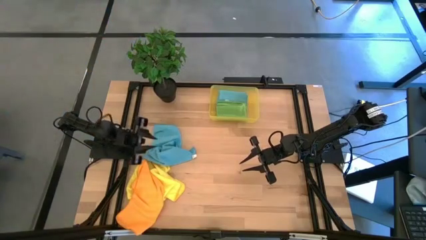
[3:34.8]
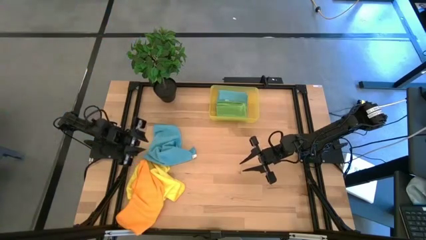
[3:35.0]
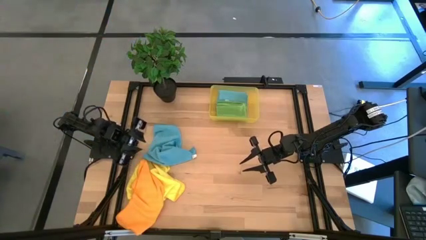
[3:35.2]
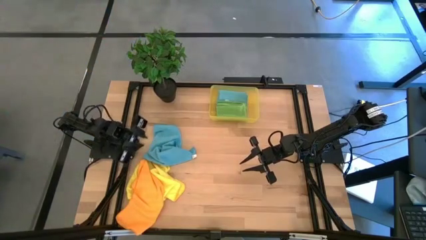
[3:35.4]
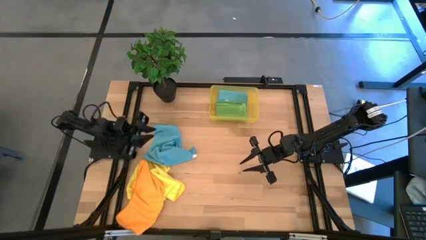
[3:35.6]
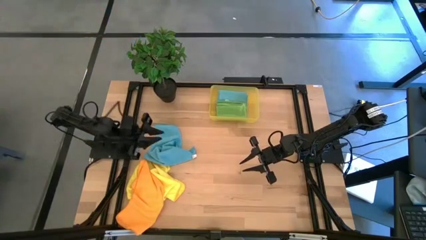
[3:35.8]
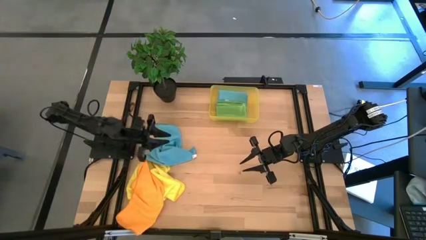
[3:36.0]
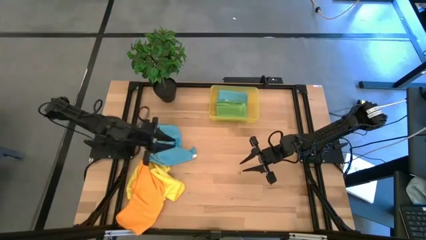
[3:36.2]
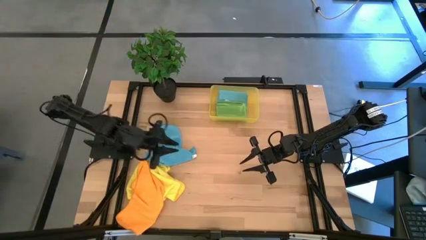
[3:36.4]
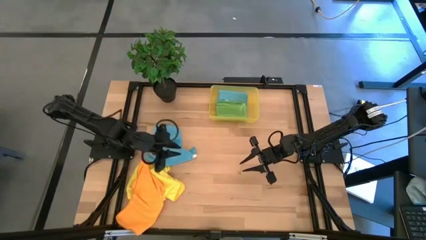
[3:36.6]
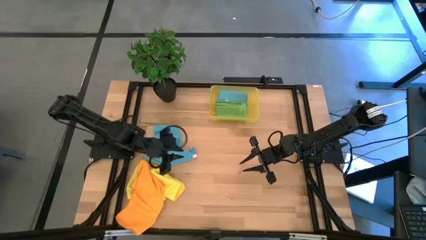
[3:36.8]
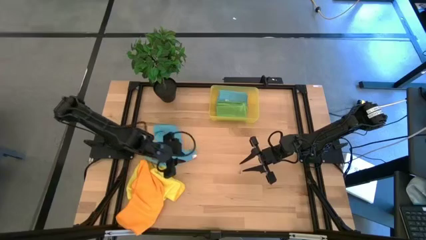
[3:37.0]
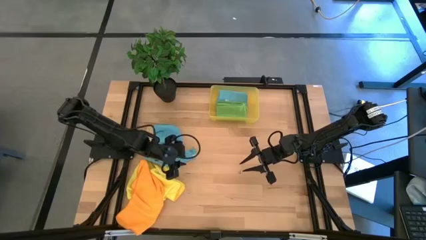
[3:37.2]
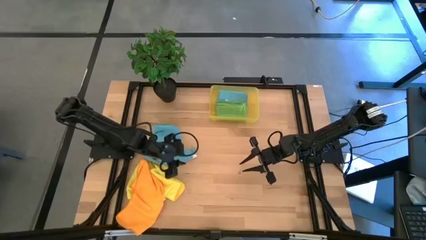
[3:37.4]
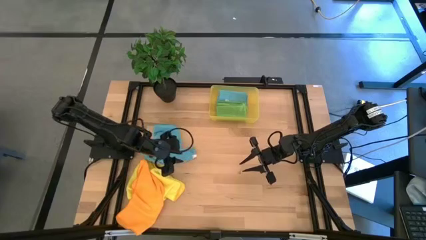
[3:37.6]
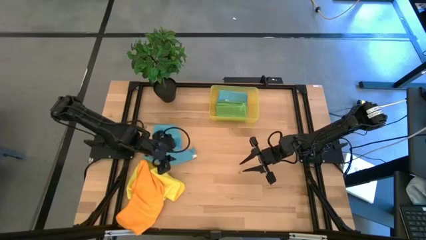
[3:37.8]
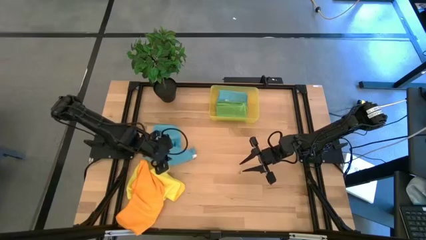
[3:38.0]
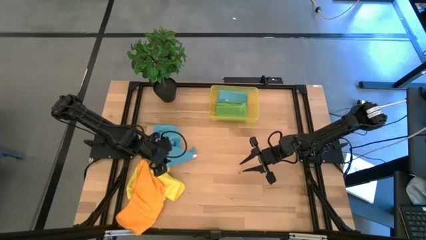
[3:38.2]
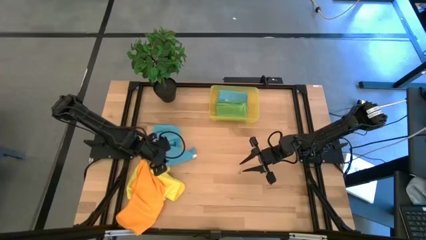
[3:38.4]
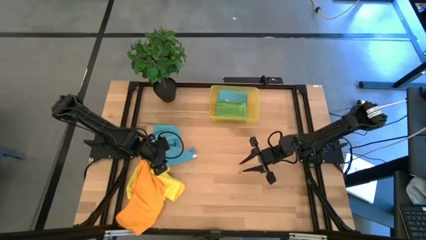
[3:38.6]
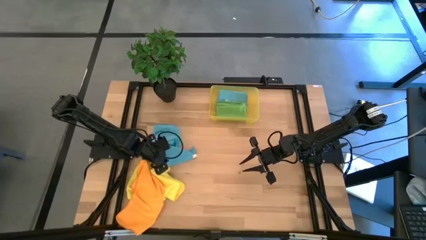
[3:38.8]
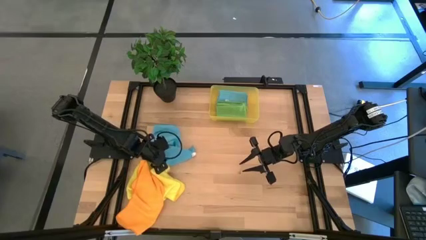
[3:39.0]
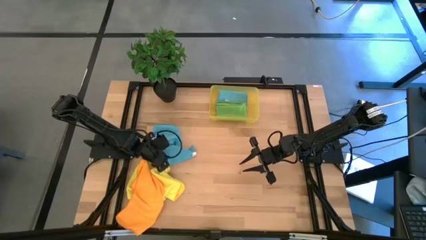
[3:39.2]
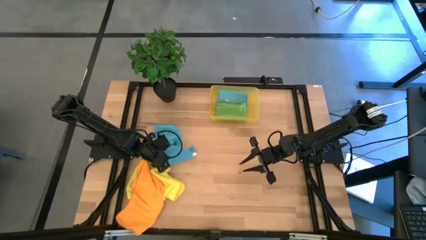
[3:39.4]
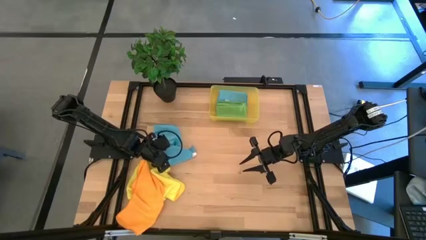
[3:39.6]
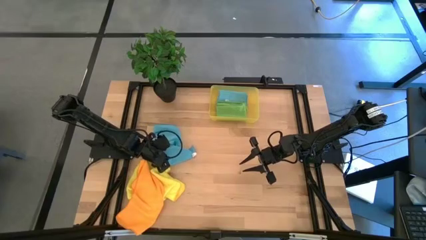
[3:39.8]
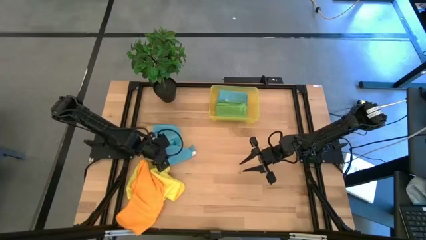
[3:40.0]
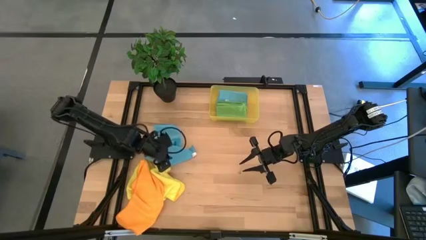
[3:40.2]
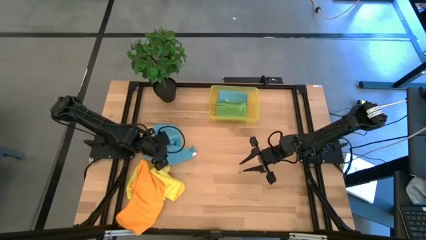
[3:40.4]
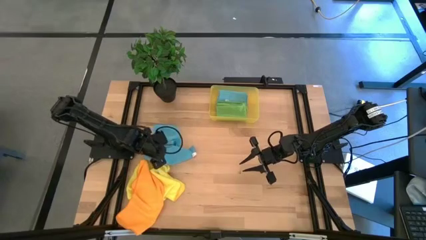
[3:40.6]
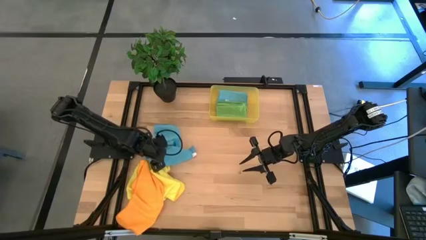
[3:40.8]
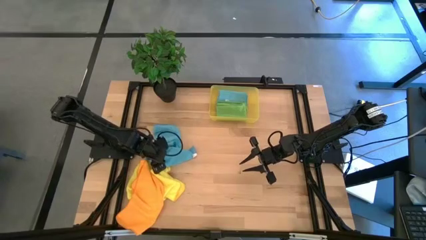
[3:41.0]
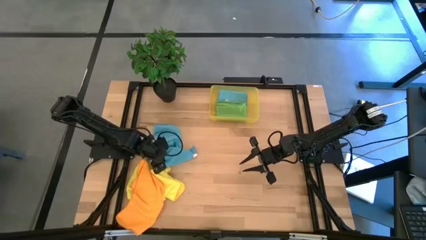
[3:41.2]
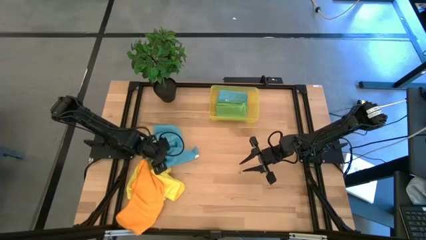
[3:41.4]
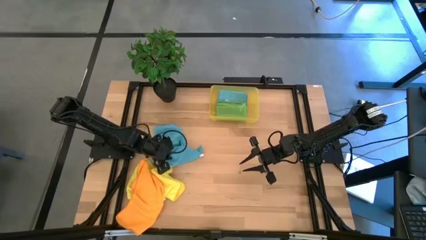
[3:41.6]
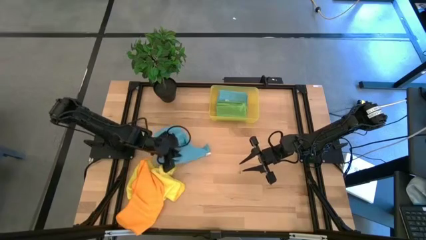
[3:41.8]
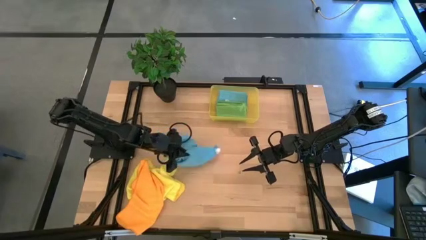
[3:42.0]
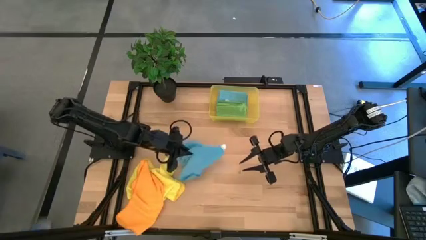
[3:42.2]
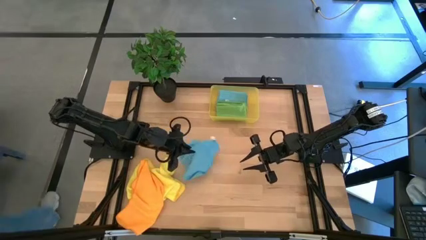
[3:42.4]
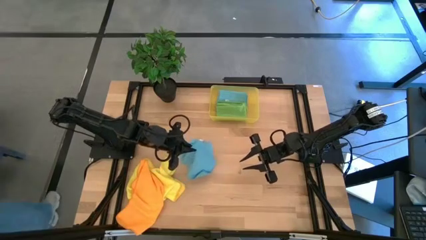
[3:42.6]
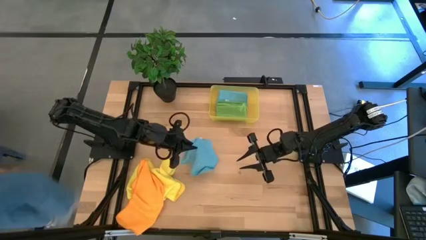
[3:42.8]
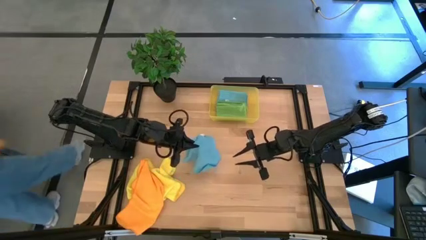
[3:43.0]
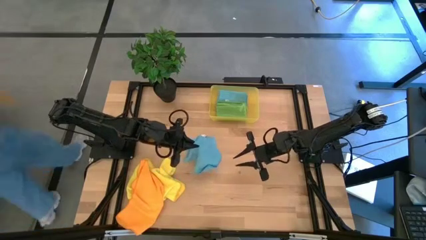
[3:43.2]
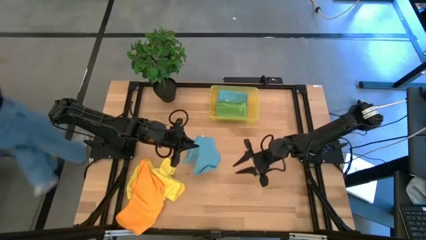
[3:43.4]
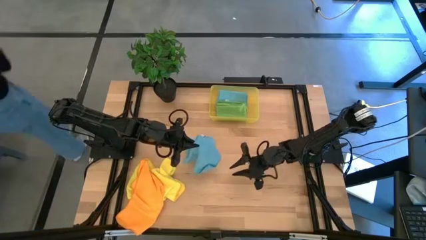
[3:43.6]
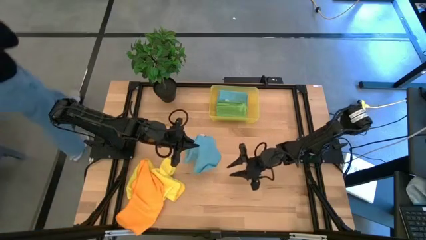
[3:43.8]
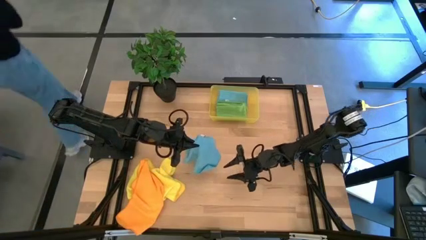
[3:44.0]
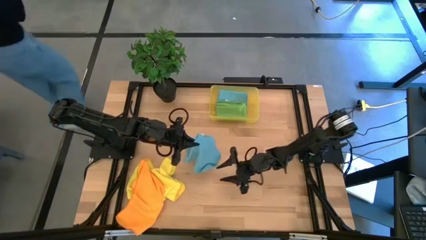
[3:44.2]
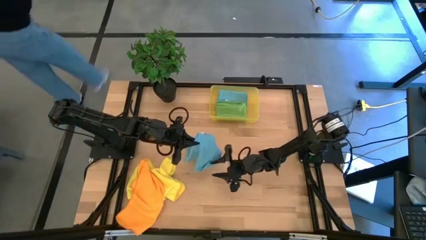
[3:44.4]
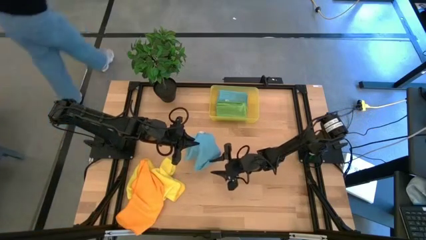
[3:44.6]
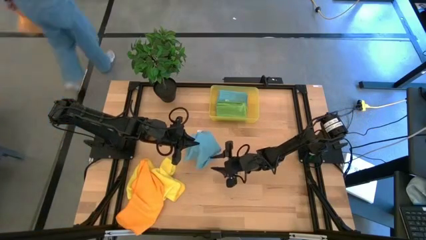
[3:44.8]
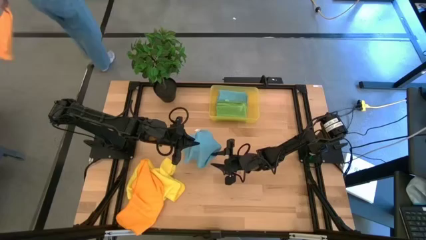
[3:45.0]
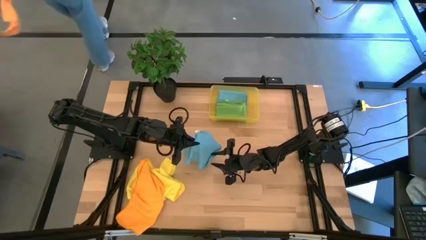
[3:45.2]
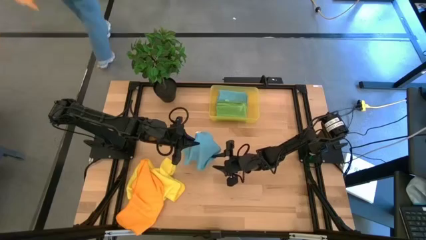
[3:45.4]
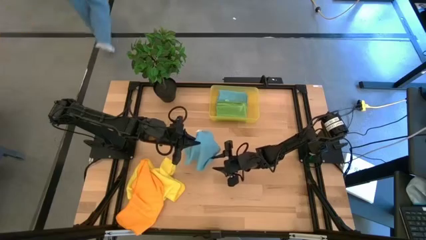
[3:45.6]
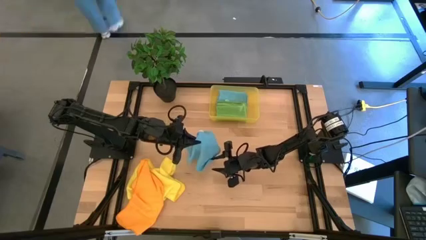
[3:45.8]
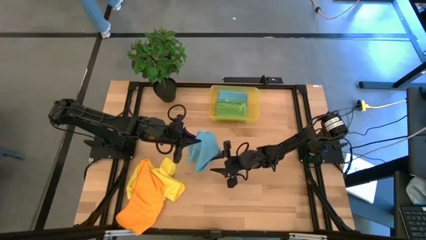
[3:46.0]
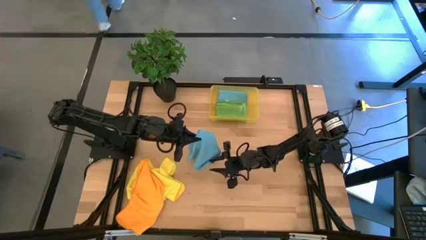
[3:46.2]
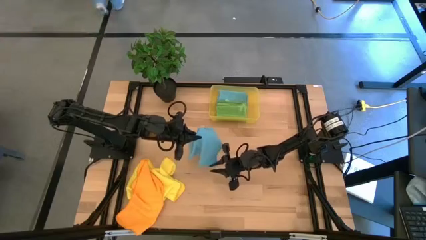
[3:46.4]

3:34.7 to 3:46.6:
Task: Fold microfiber towels
Fold the blue microfiber towel

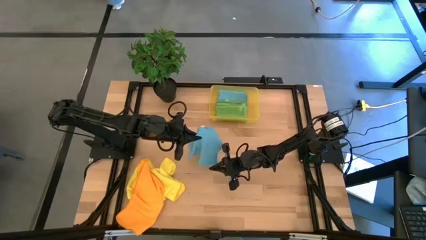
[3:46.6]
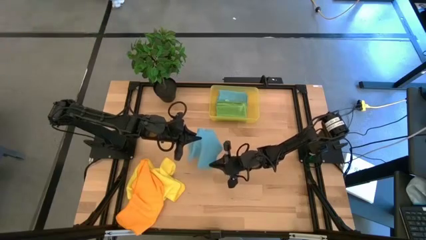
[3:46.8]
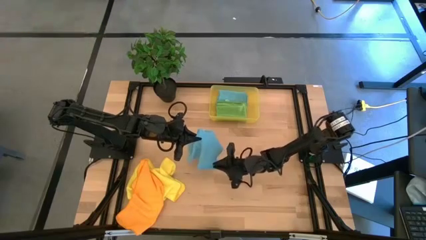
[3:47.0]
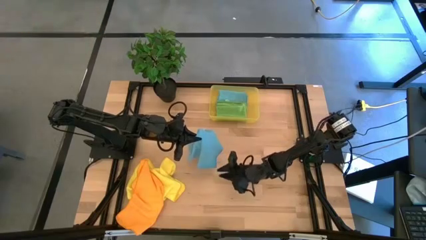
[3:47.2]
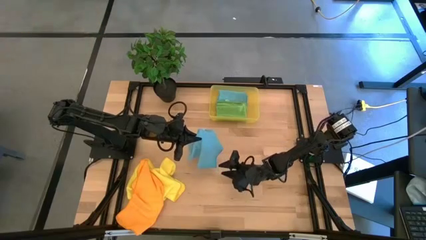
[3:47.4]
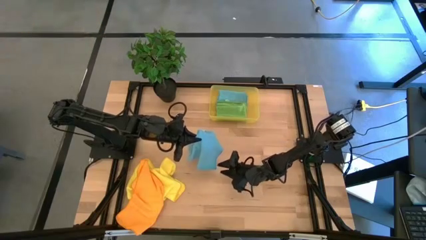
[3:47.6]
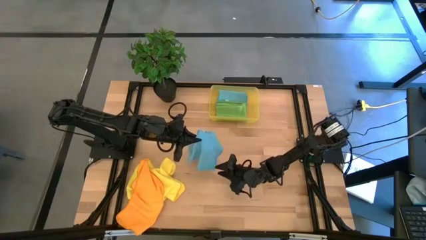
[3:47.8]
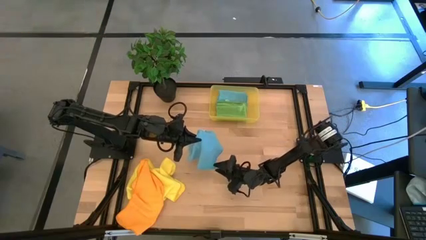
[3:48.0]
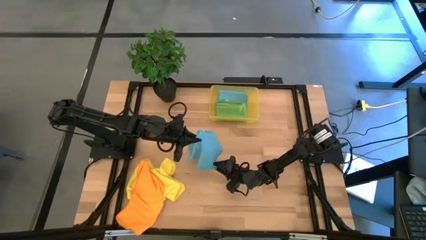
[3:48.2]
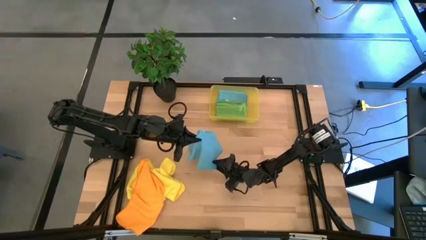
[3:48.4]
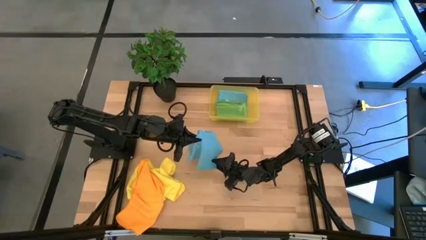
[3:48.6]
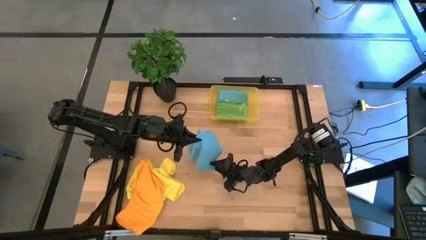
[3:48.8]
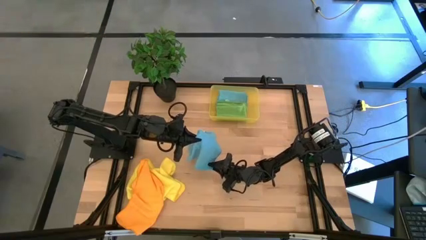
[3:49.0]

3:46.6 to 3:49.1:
Fold the blue microfiber towel
